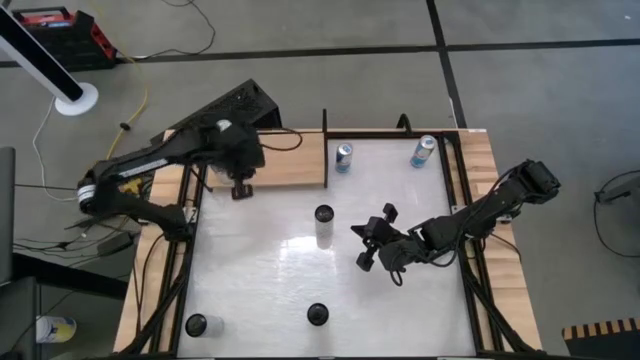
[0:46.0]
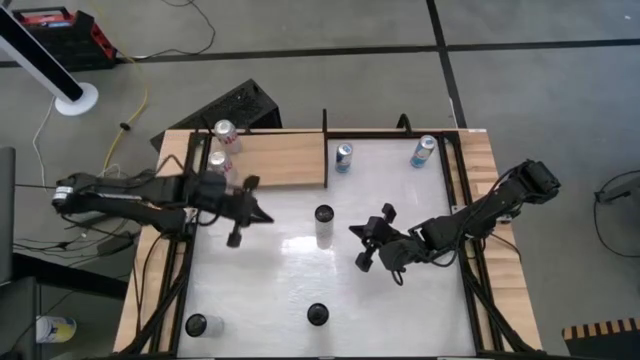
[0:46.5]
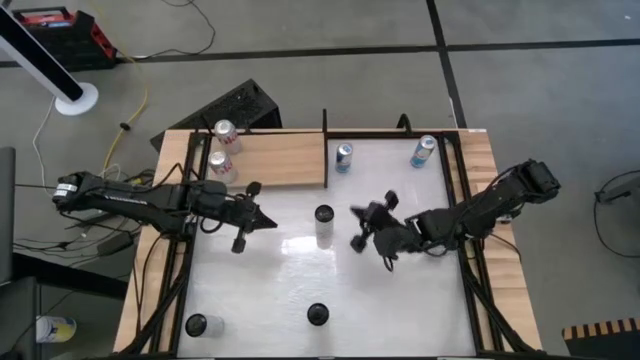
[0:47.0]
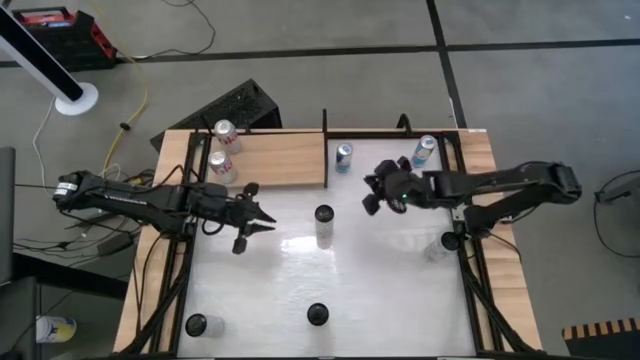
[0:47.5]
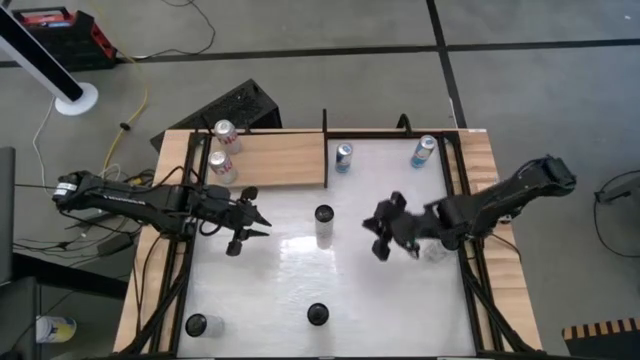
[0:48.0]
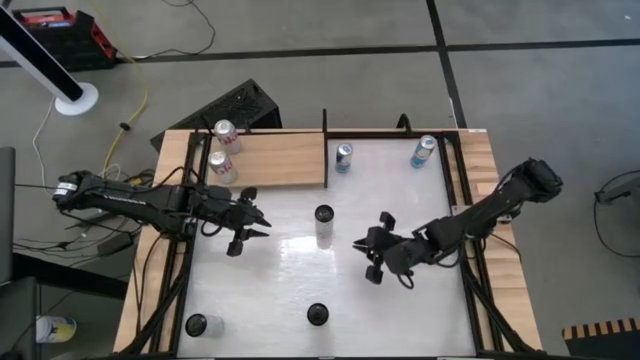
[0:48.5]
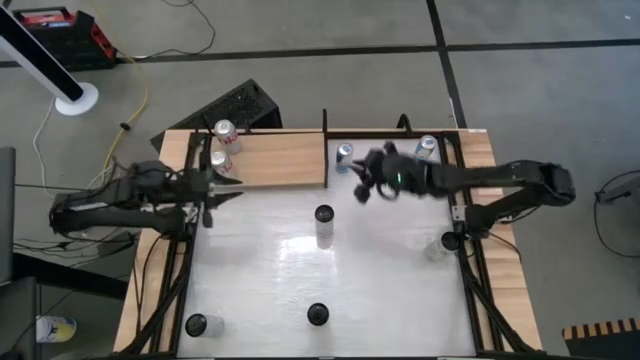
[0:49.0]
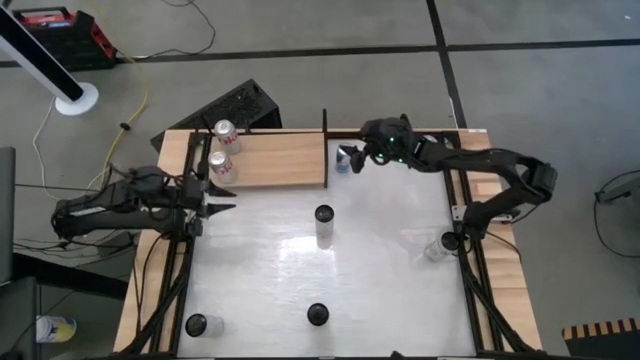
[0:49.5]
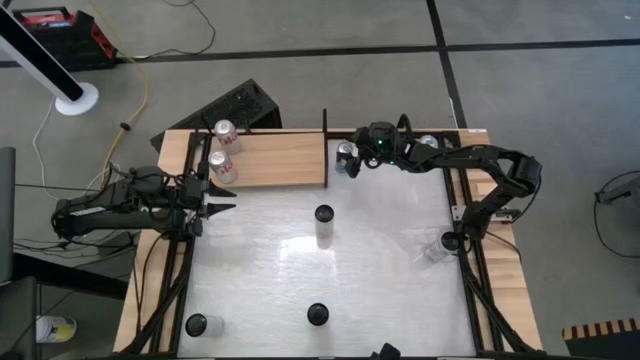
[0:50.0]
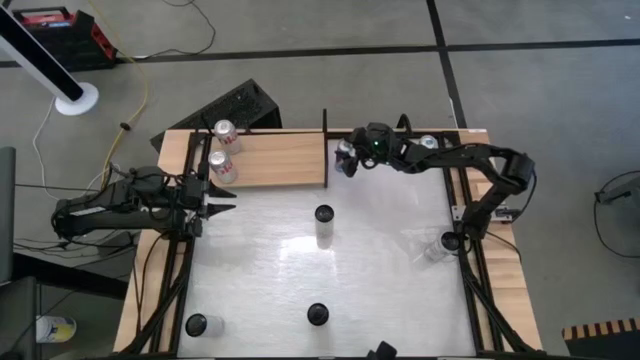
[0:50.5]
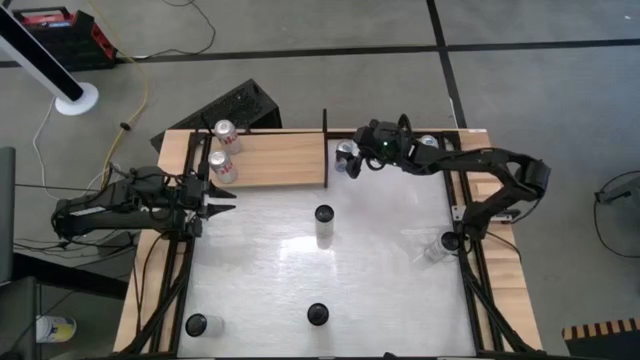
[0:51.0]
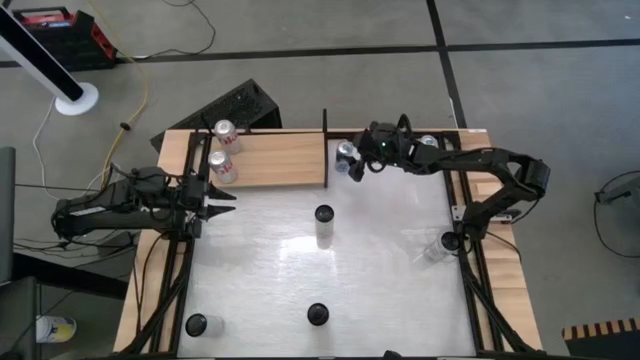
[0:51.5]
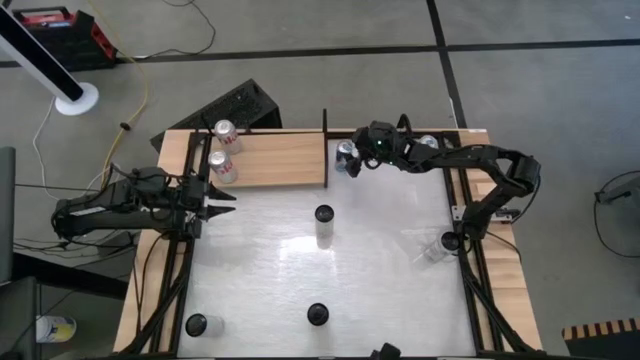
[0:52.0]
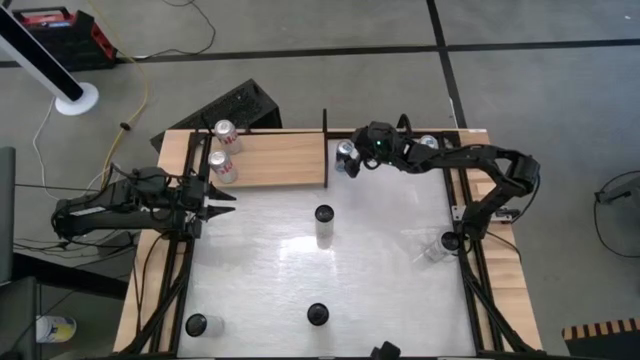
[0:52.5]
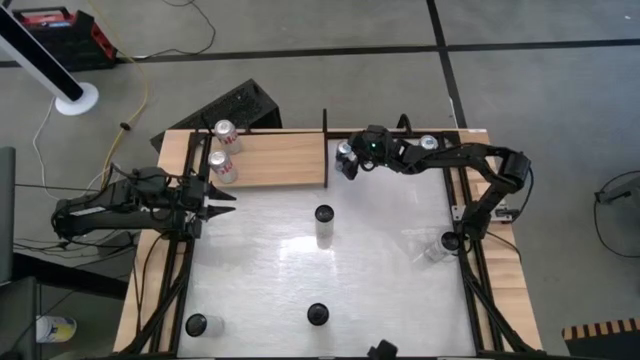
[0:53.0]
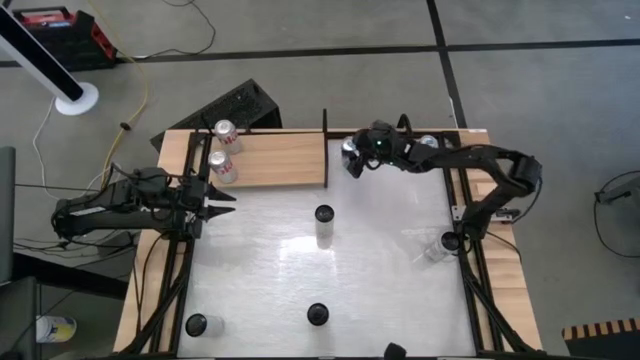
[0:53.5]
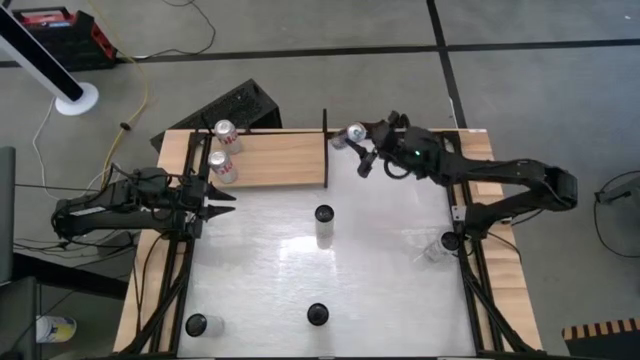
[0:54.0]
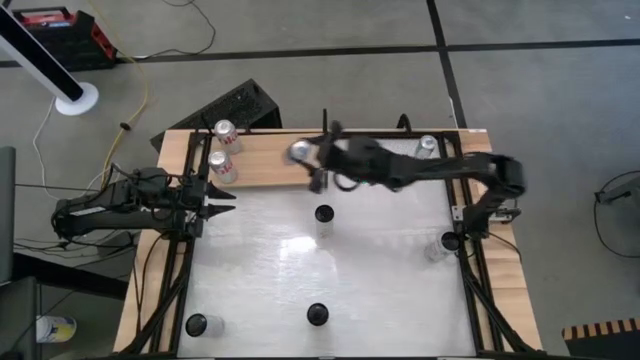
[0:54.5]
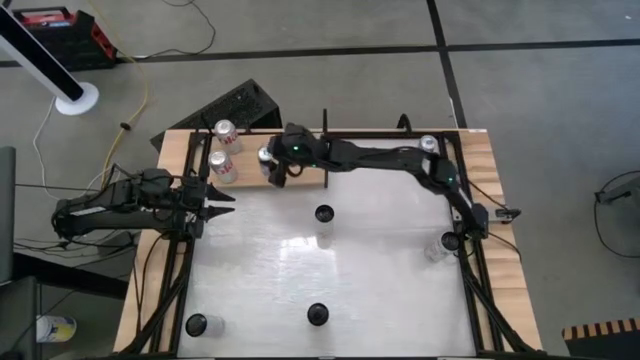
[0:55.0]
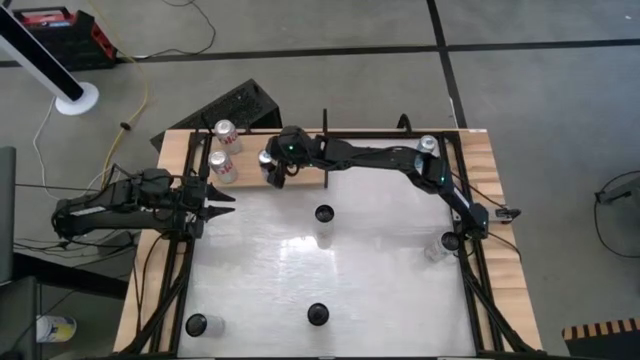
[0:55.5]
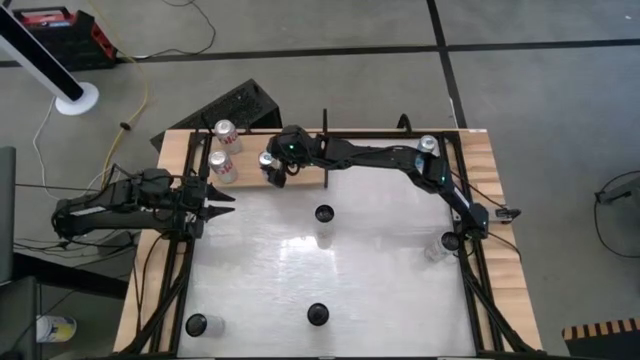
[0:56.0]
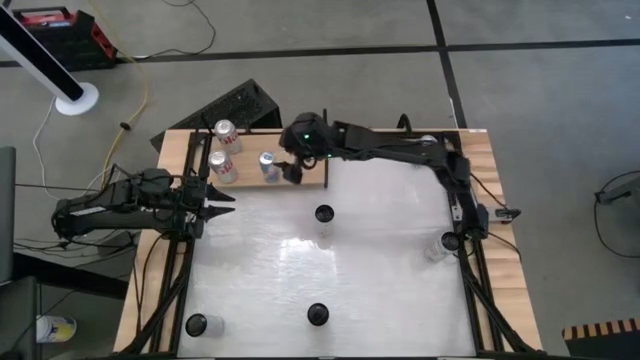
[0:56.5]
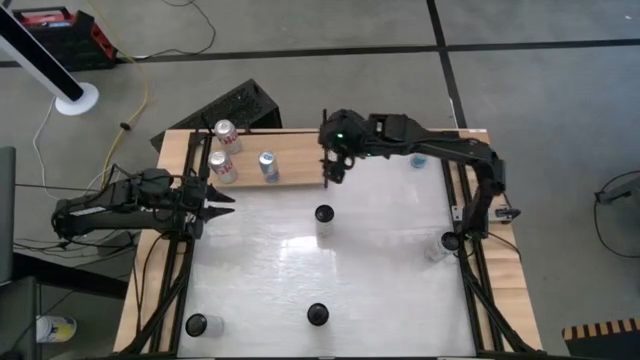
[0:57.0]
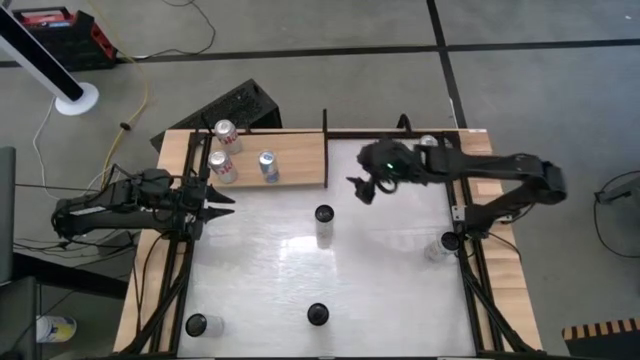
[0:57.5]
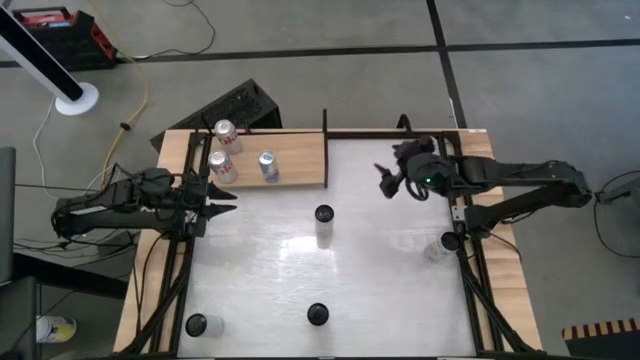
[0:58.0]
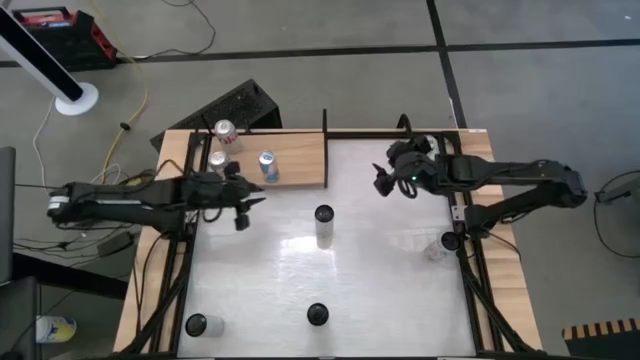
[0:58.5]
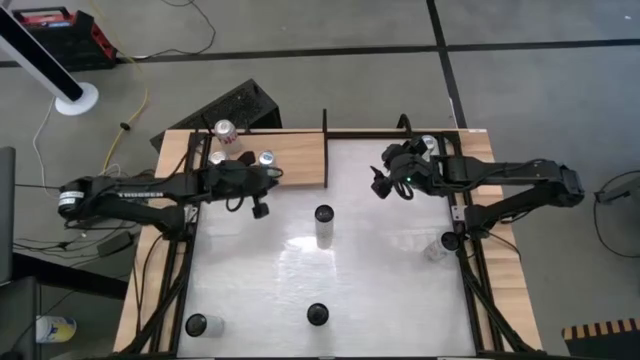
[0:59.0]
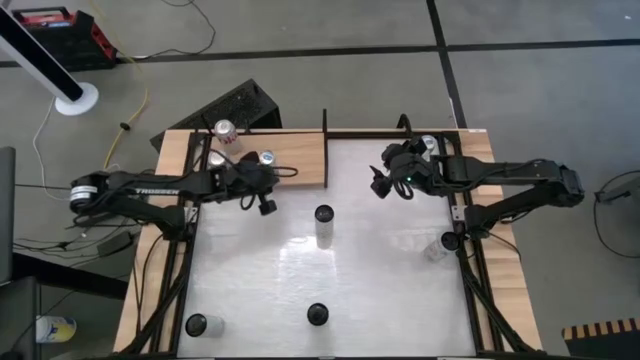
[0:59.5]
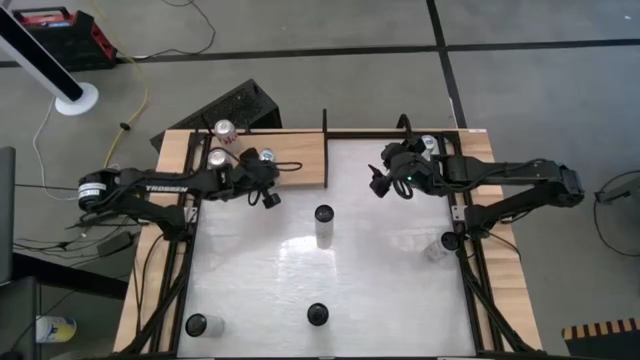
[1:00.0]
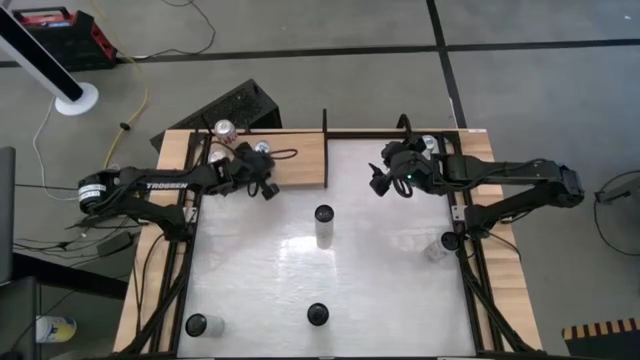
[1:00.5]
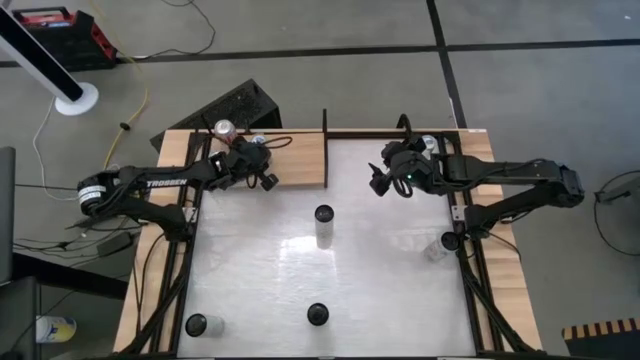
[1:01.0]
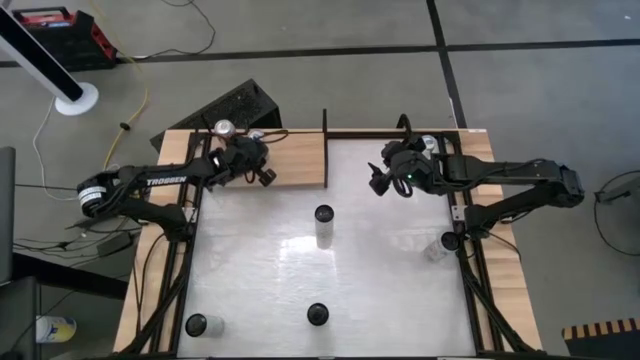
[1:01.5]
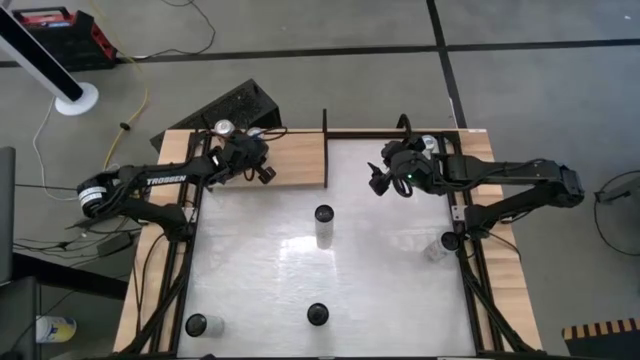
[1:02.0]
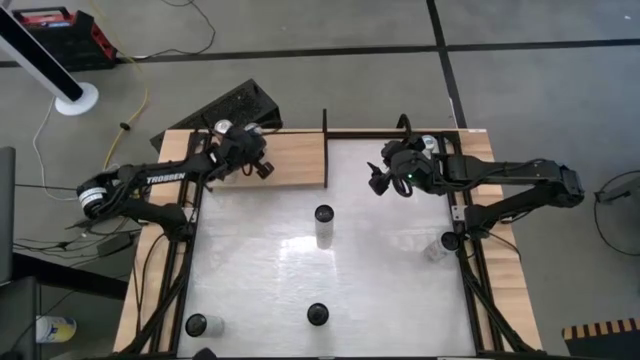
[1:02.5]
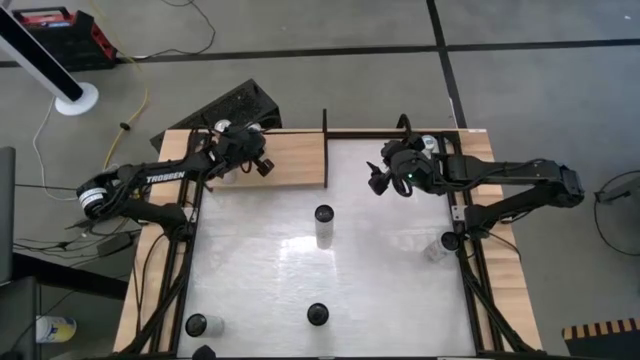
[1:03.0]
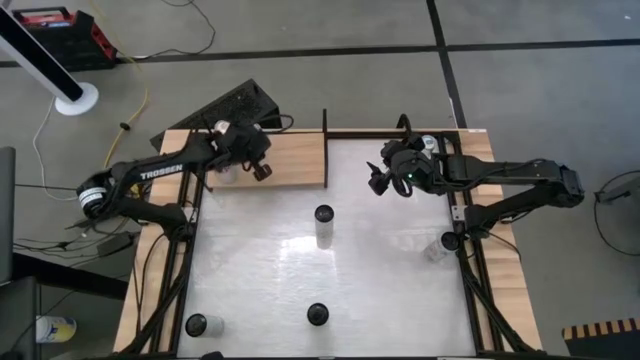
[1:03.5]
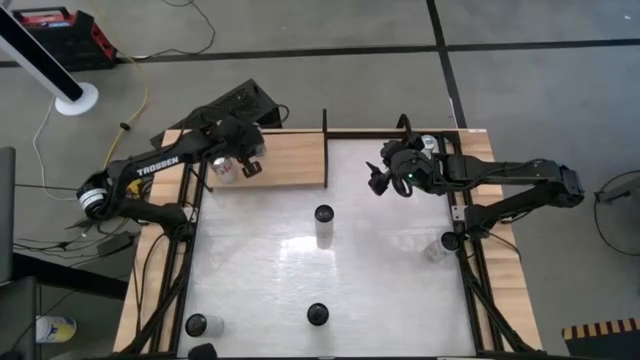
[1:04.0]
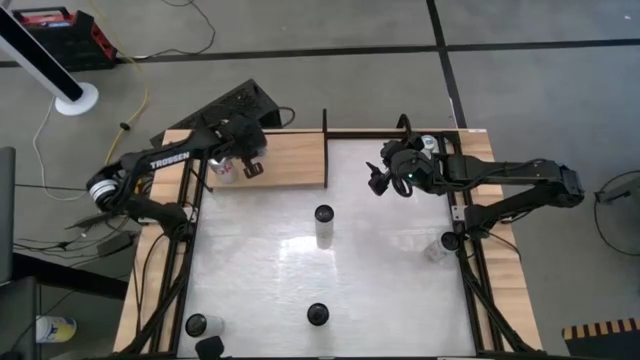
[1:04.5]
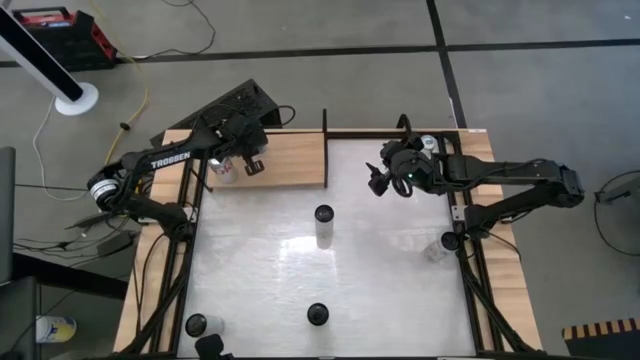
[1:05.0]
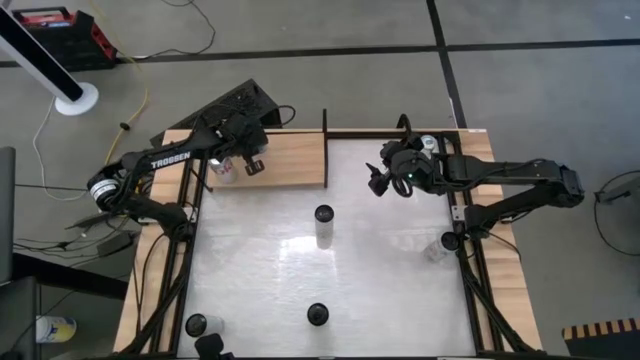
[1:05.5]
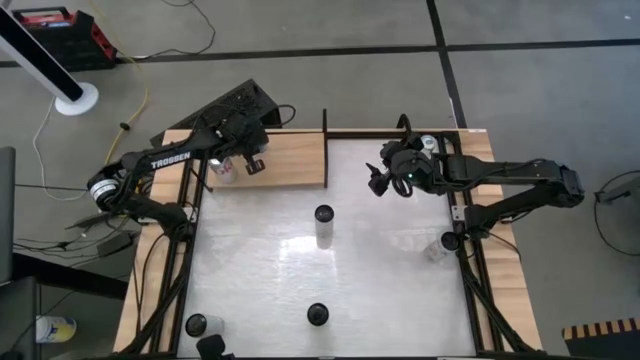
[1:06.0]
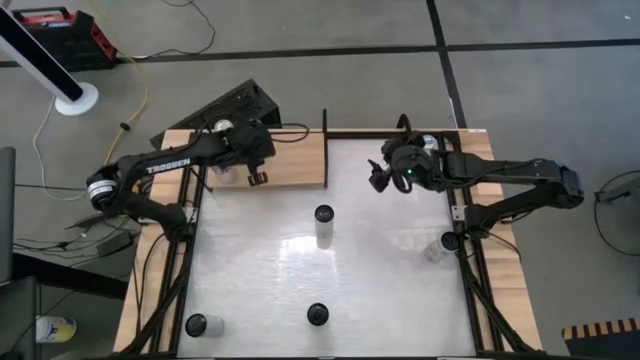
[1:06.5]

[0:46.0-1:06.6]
Task: Place canned beverage on shelf
Put the top left blue soda can on the shelf

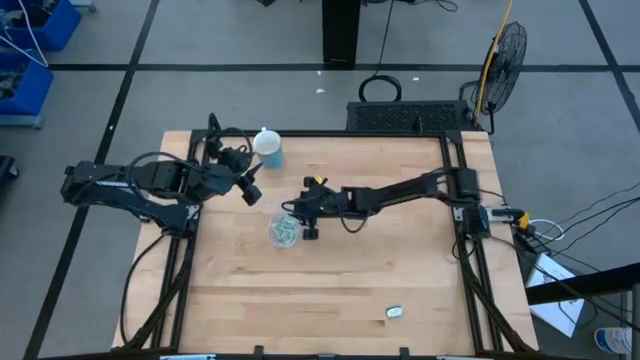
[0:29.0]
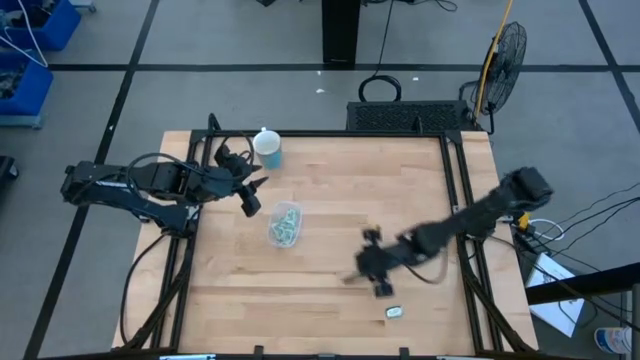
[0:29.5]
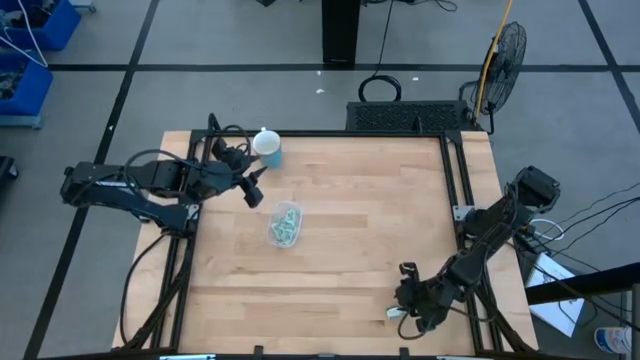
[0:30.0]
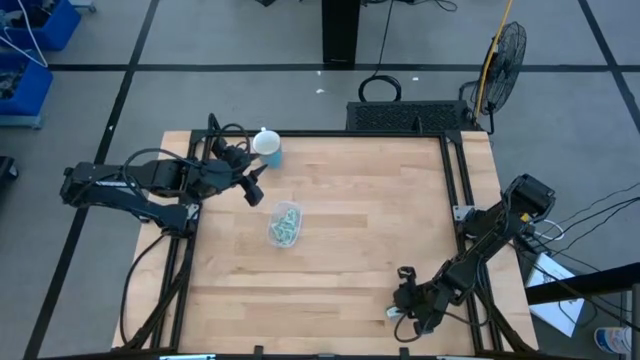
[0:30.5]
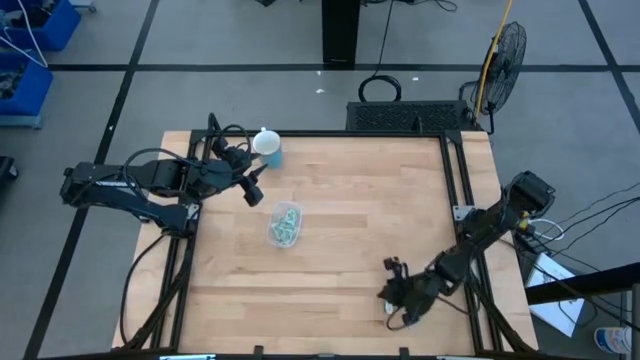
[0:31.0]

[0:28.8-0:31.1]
Task: Pick and place Stevia / Truvia into bins
Put the green truvia packet into the transparent container
